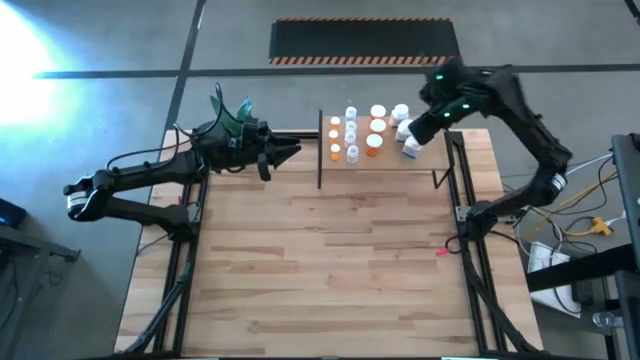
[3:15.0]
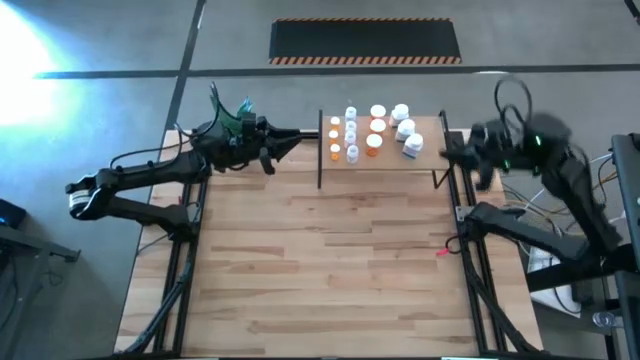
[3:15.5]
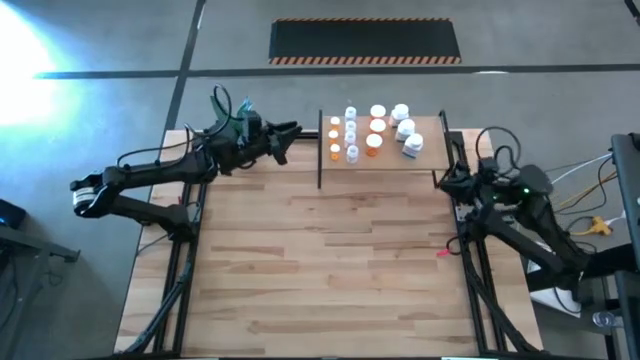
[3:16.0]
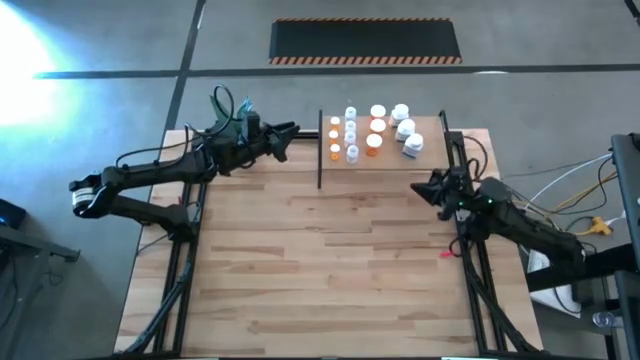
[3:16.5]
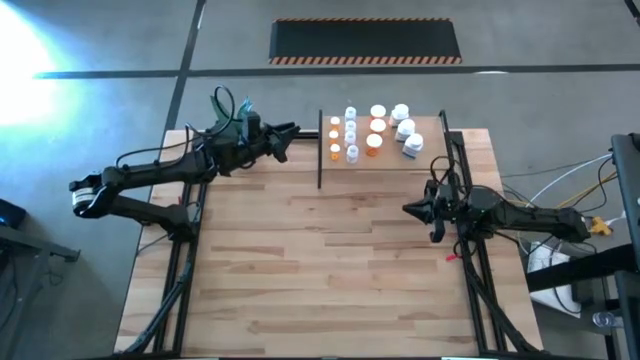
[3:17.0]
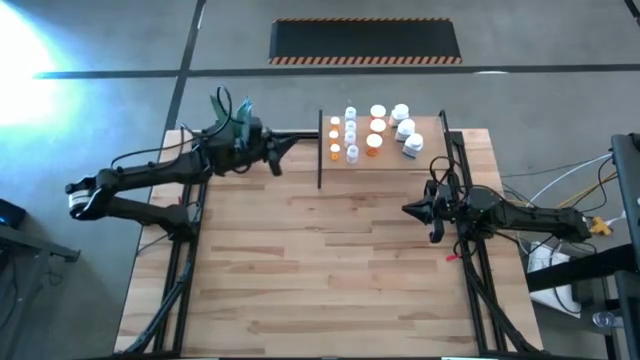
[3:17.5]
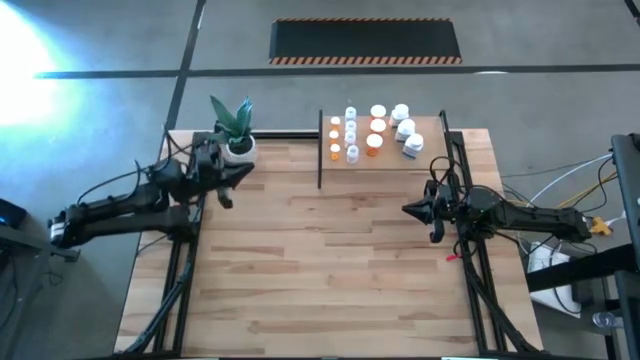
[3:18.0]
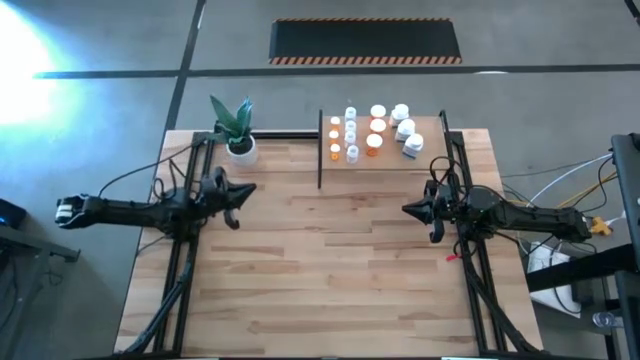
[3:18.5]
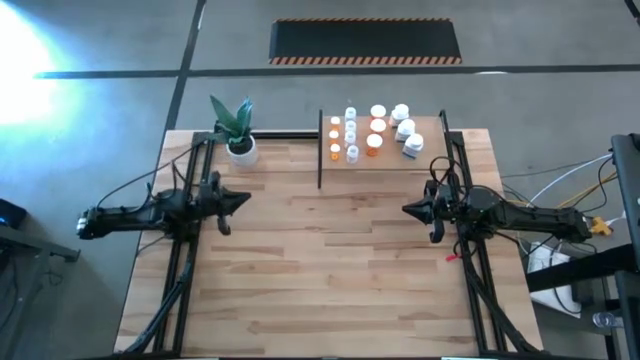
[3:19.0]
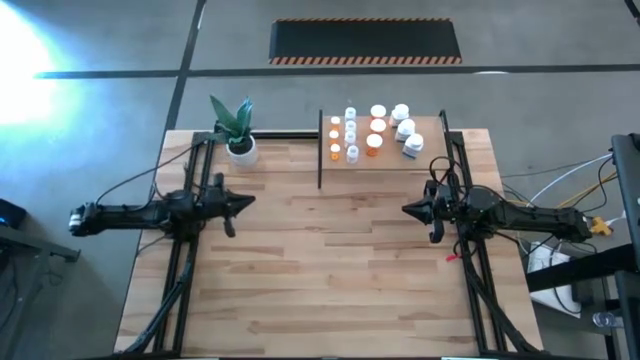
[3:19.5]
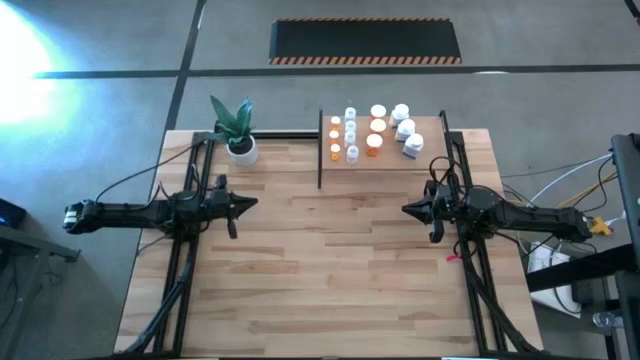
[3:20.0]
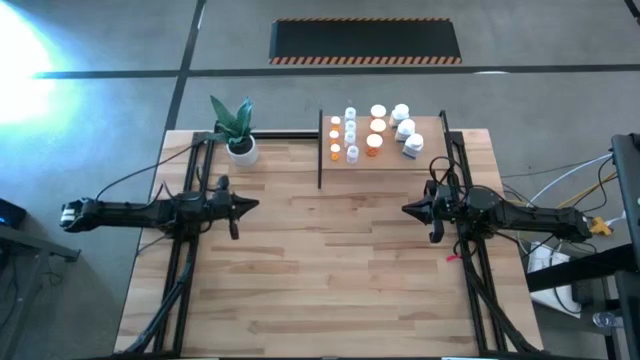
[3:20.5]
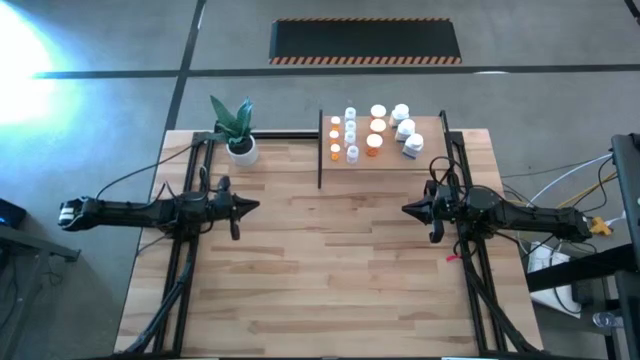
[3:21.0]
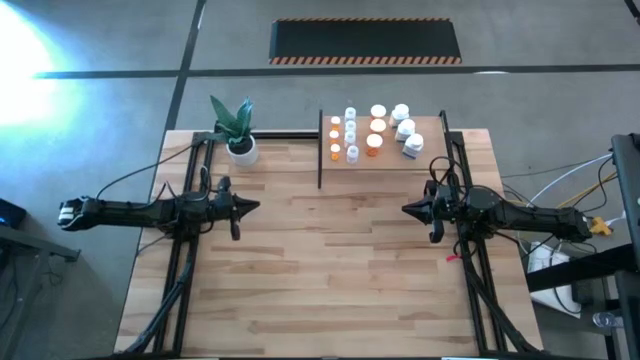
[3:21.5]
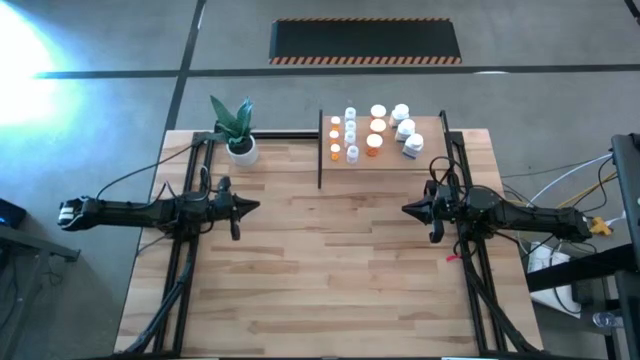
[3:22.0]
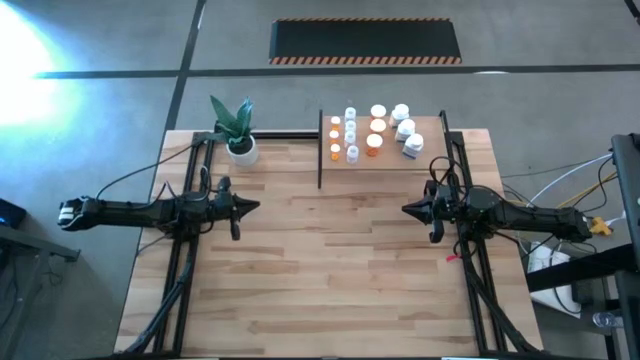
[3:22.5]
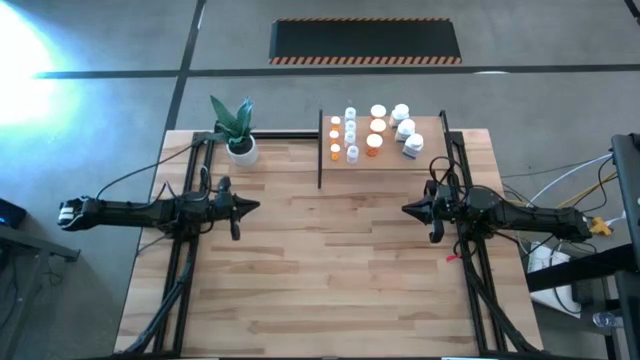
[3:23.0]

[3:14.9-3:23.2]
Task: Pick and place medicine bottles onto shelf by color
Return to Home Position

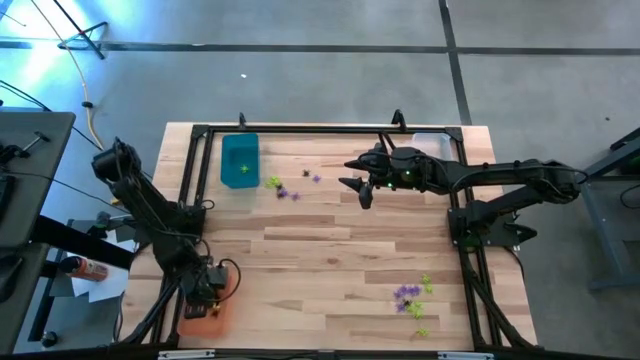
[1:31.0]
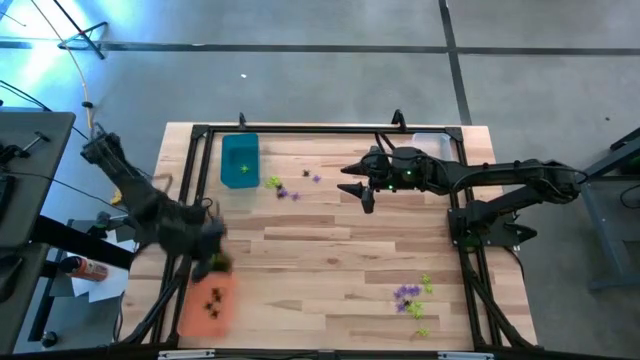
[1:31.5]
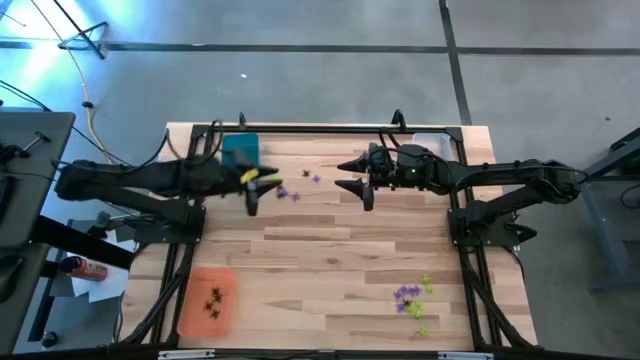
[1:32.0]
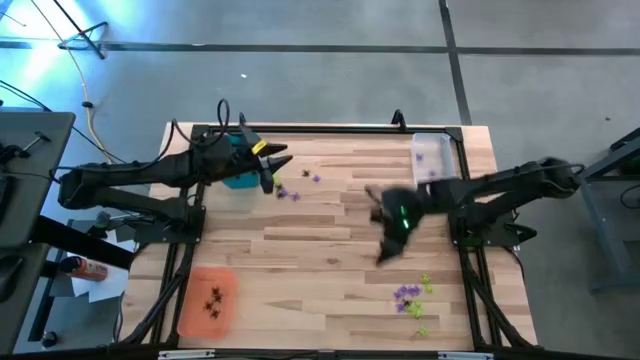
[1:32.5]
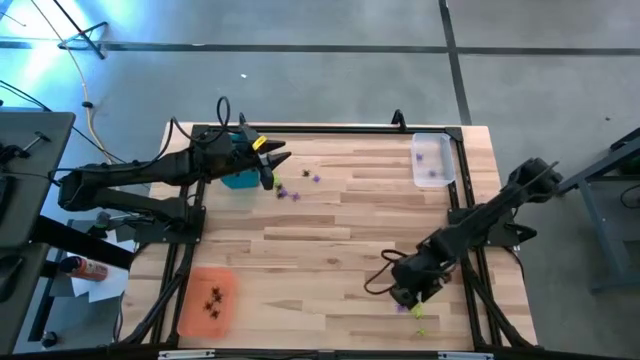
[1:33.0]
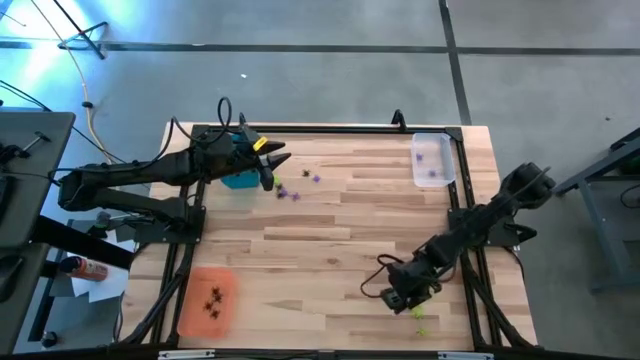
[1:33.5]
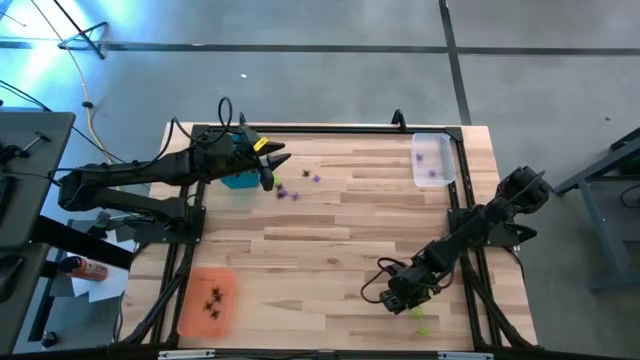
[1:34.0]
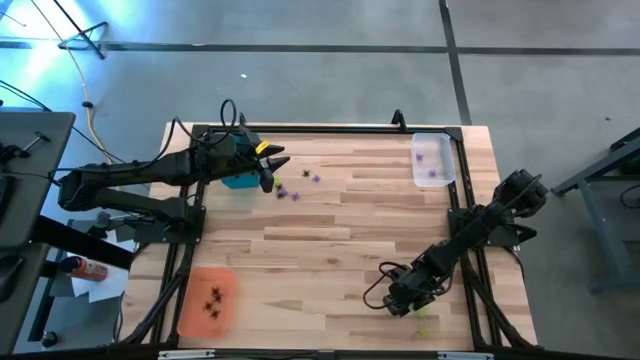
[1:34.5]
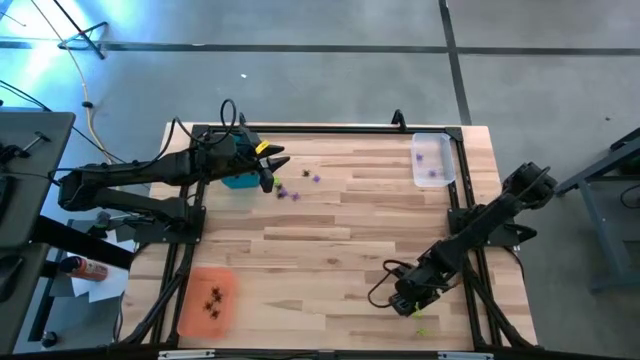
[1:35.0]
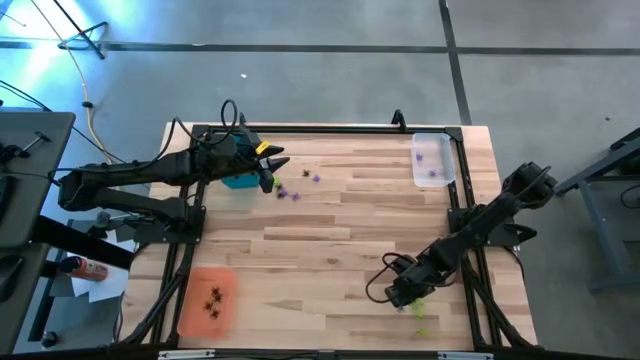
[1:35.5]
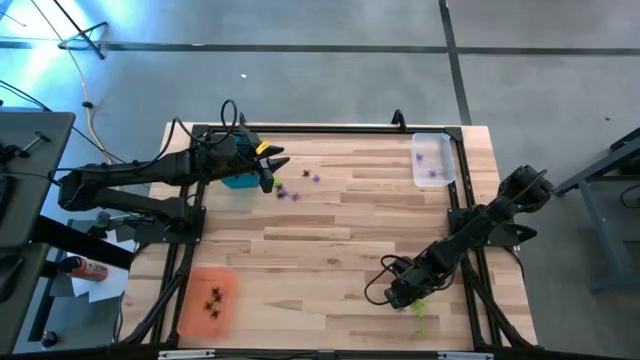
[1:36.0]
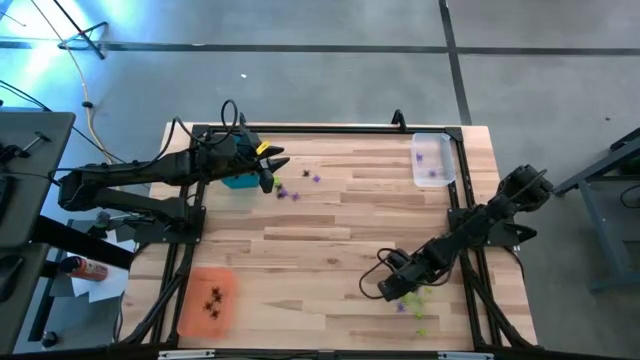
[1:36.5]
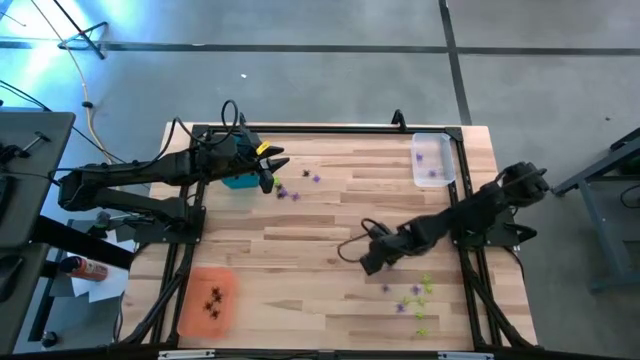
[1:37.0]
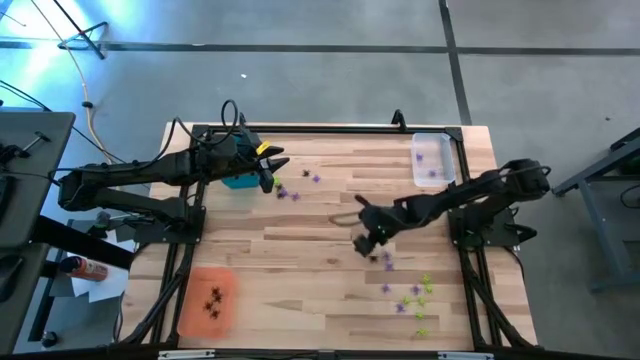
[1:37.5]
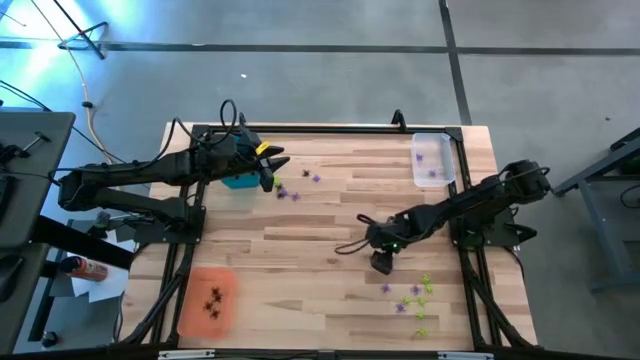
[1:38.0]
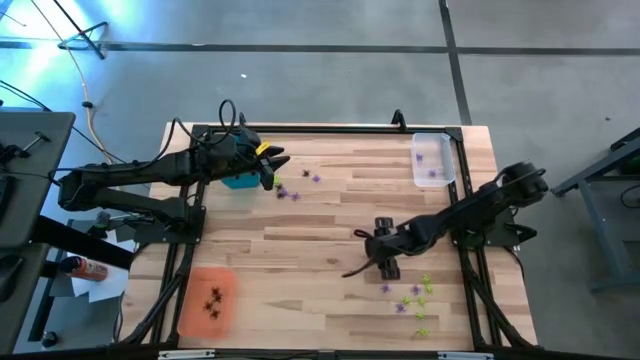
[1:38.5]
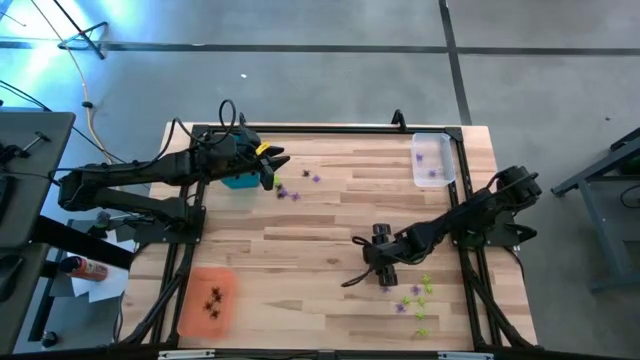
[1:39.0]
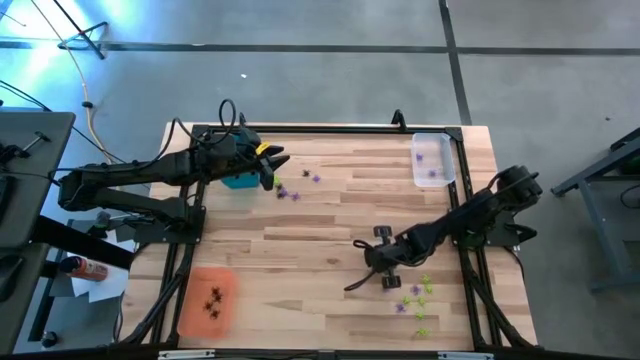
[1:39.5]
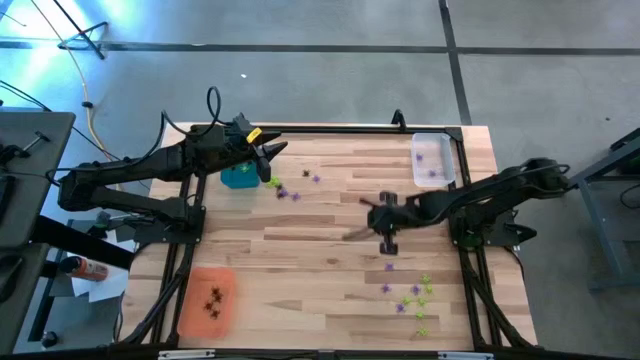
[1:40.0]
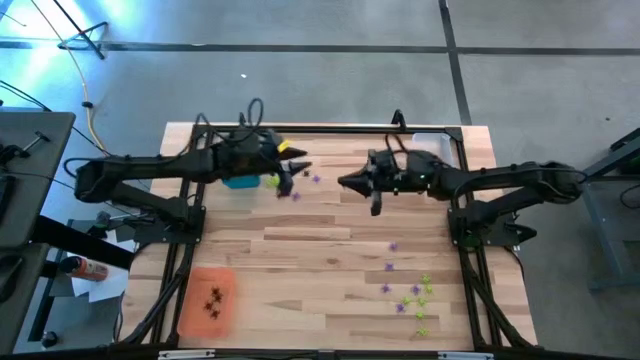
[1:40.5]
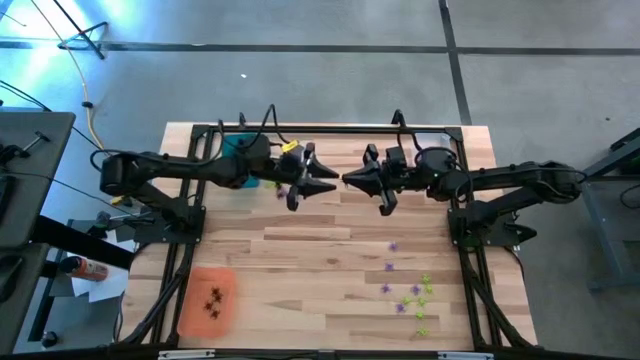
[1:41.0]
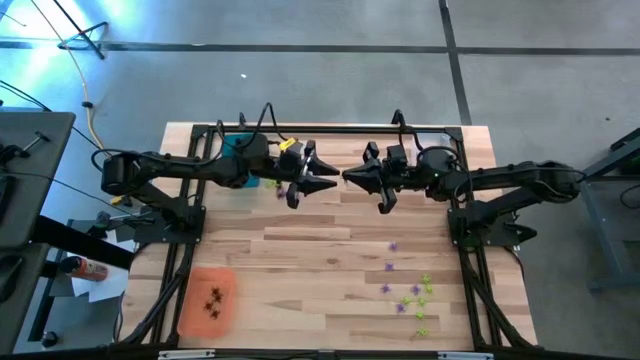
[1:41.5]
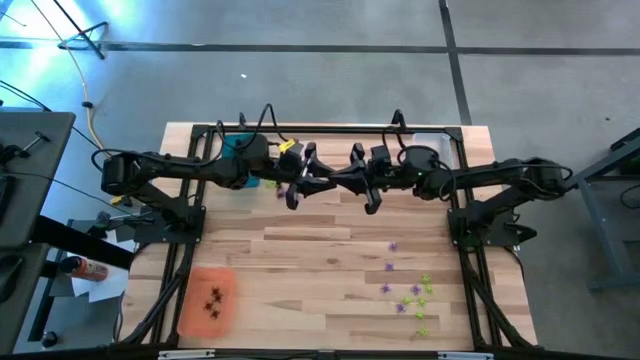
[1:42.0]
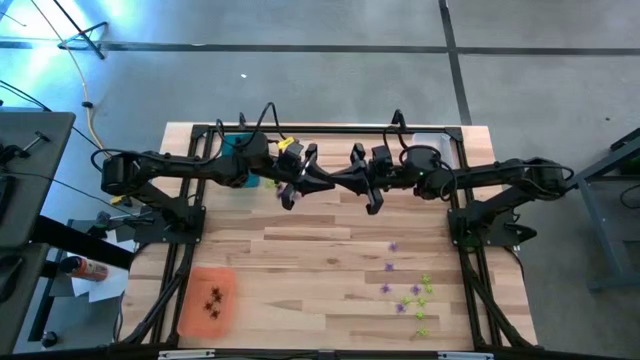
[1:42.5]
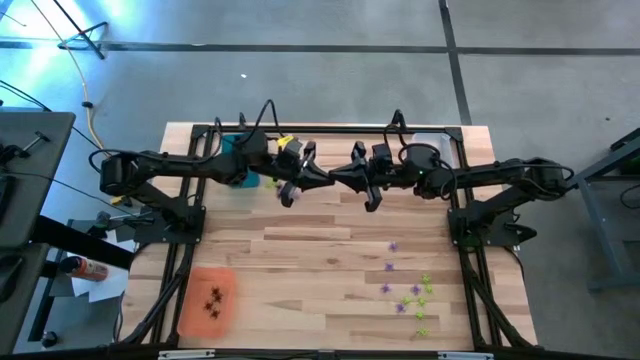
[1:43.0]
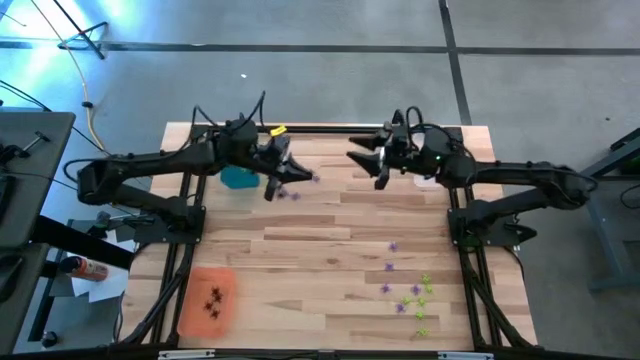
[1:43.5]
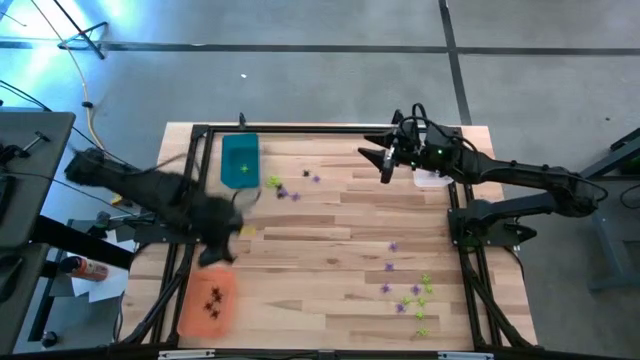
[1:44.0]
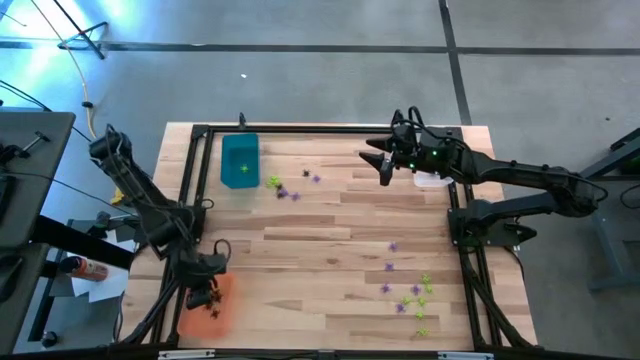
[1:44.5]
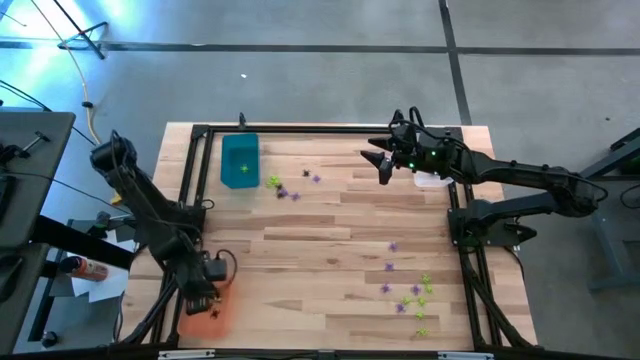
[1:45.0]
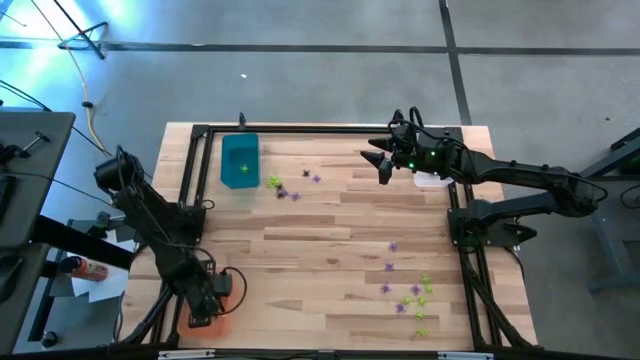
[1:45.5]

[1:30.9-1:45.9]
Task: Sort Halloween decoration
Put the black spider toy into the orange bin
